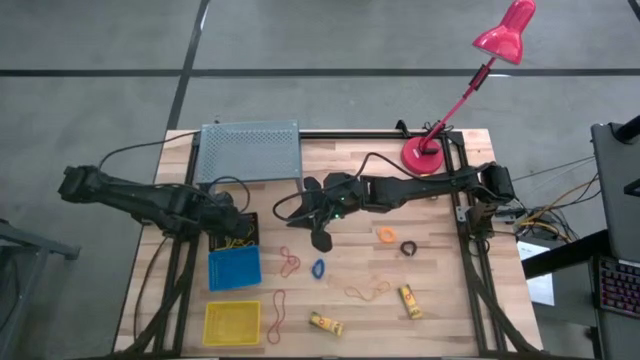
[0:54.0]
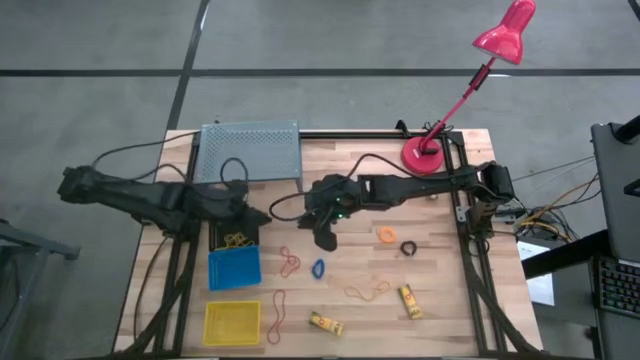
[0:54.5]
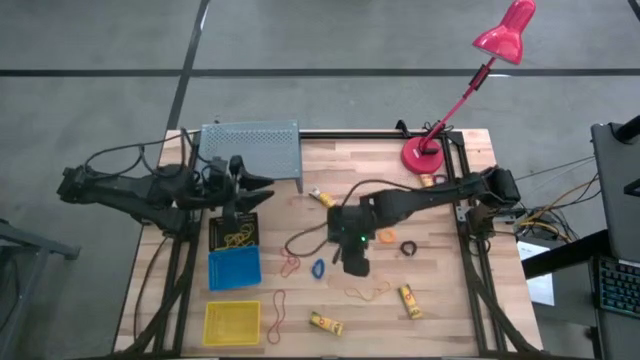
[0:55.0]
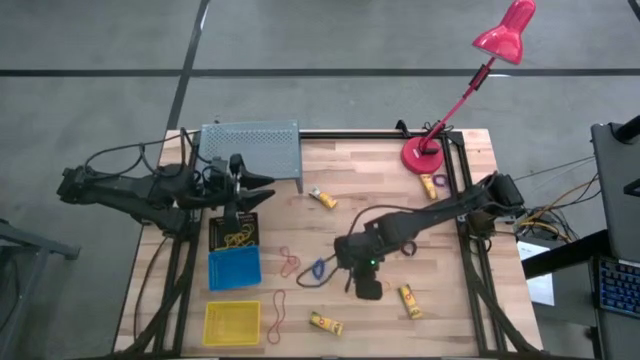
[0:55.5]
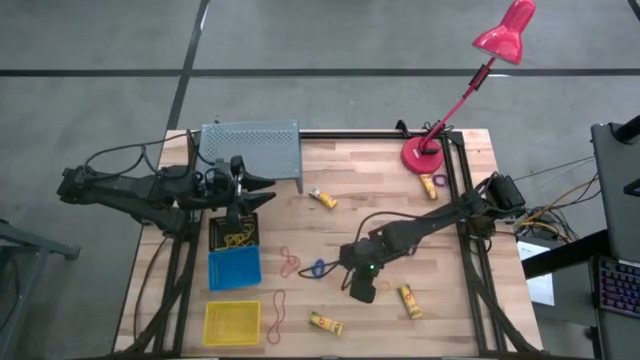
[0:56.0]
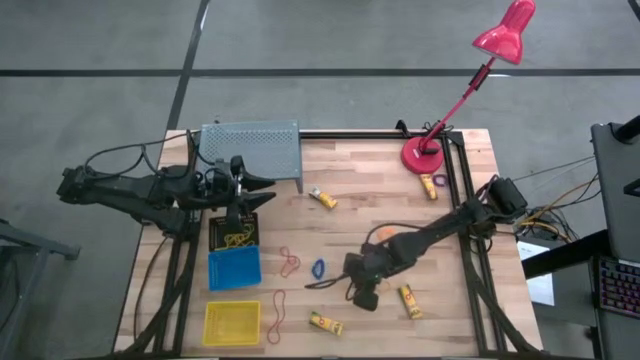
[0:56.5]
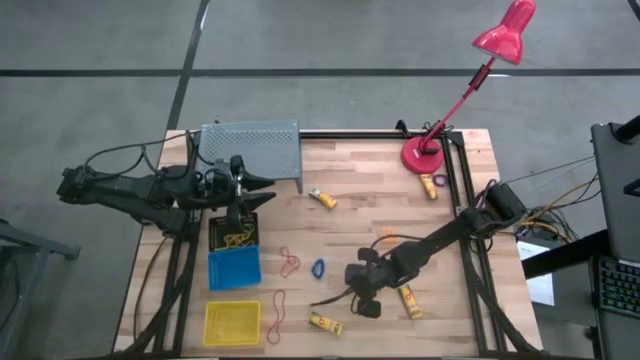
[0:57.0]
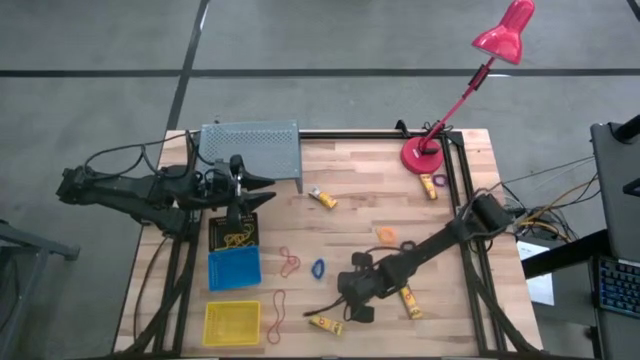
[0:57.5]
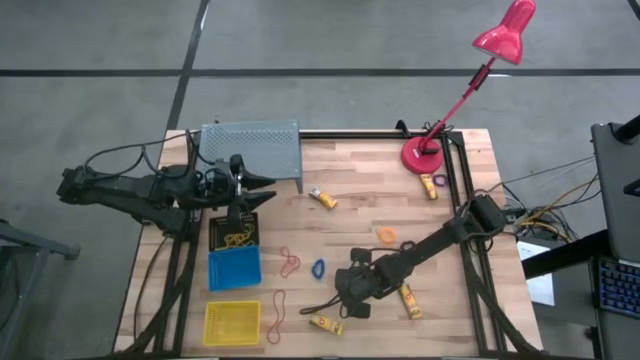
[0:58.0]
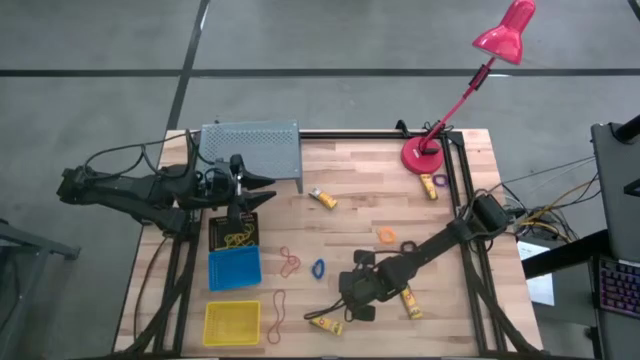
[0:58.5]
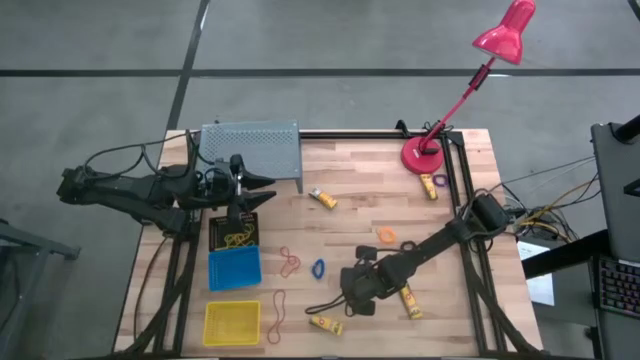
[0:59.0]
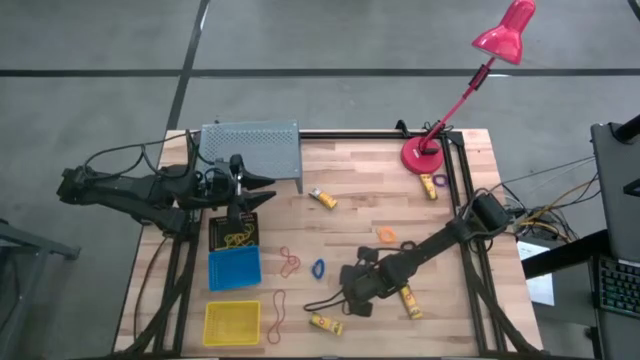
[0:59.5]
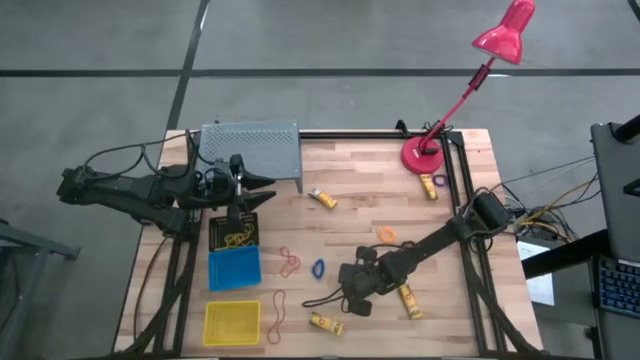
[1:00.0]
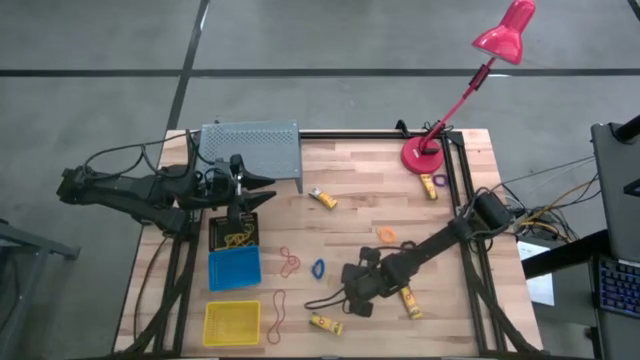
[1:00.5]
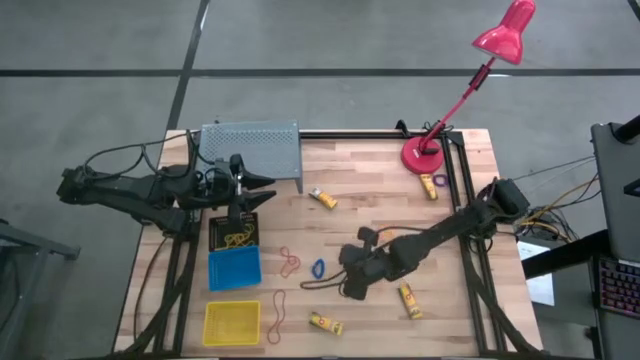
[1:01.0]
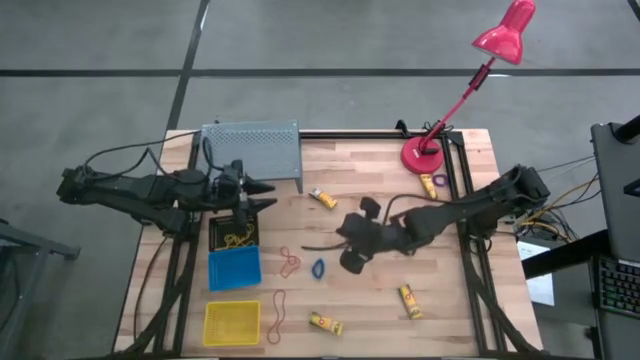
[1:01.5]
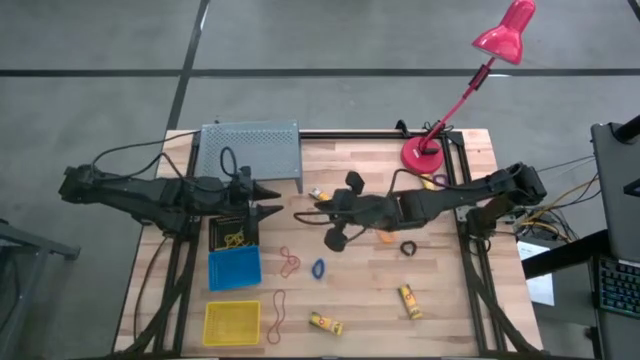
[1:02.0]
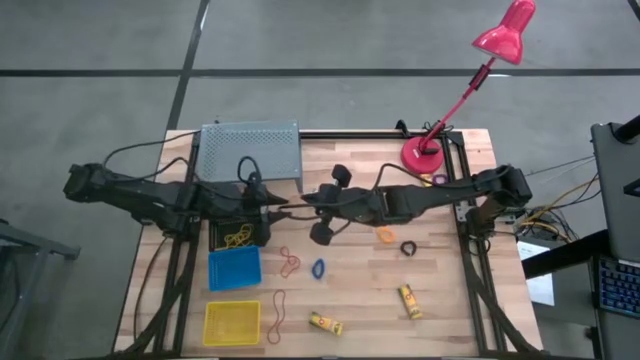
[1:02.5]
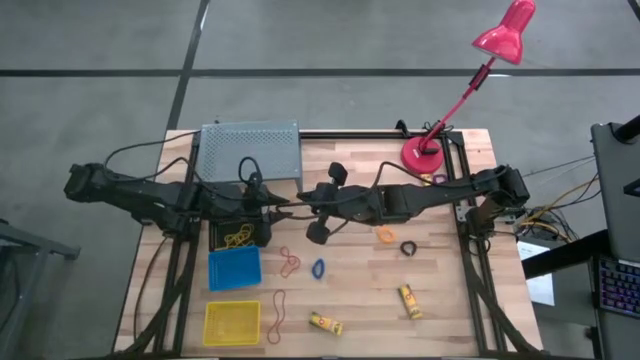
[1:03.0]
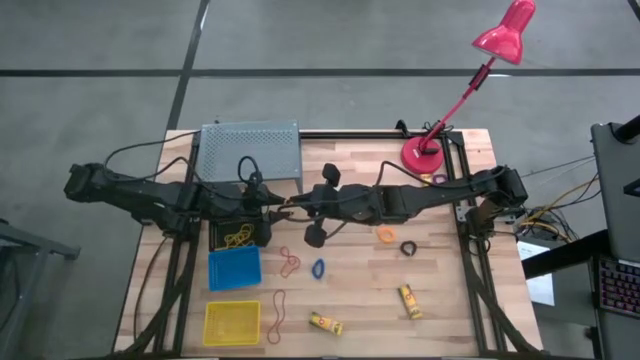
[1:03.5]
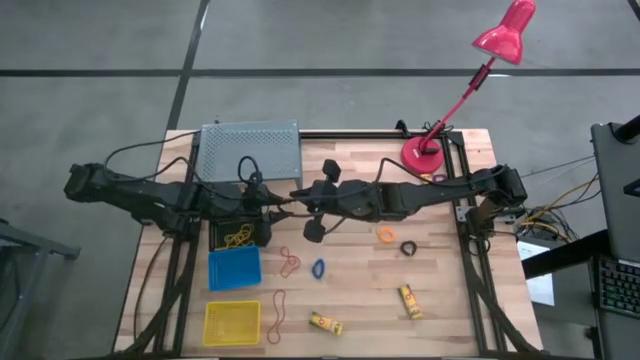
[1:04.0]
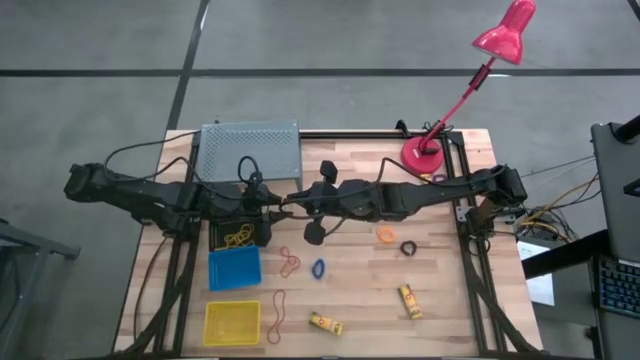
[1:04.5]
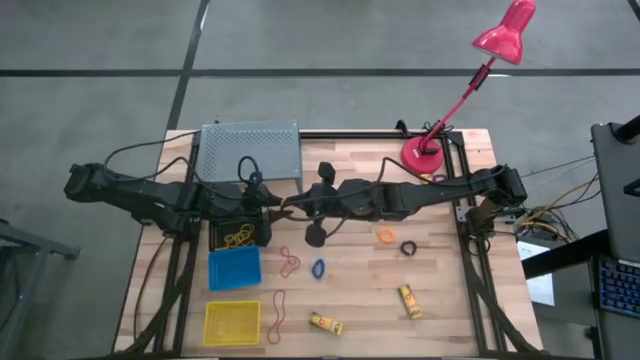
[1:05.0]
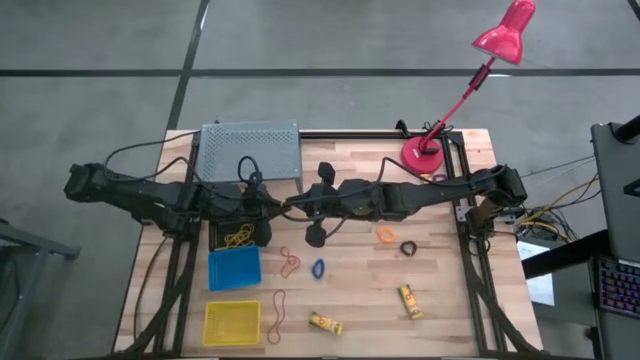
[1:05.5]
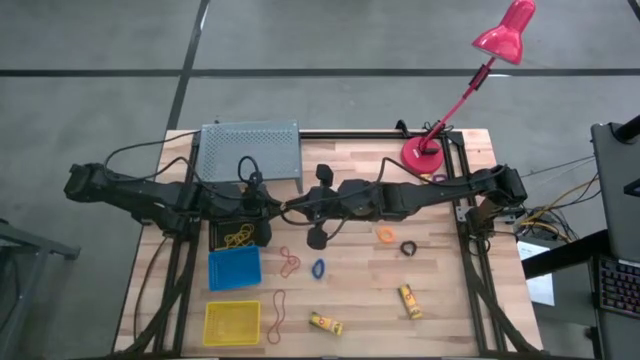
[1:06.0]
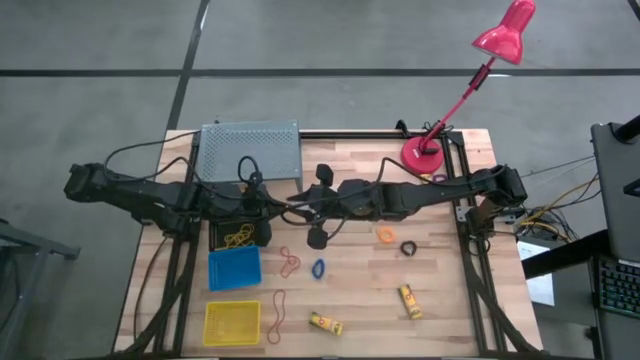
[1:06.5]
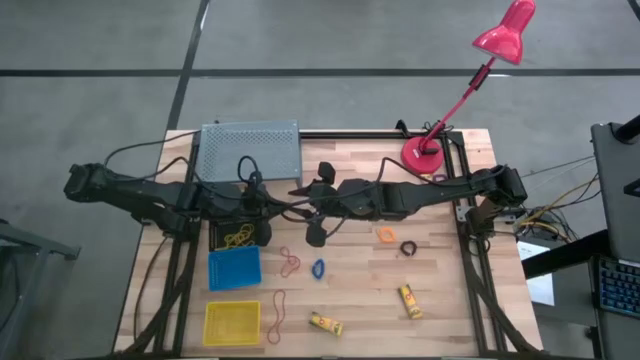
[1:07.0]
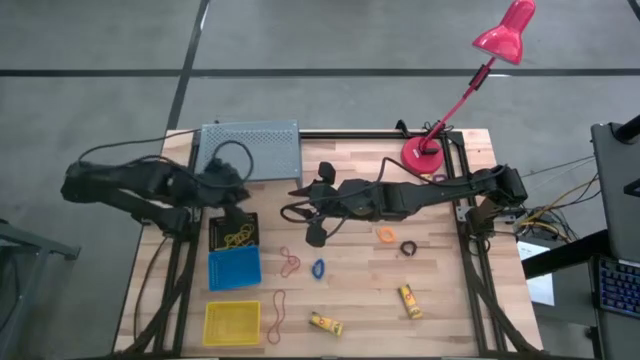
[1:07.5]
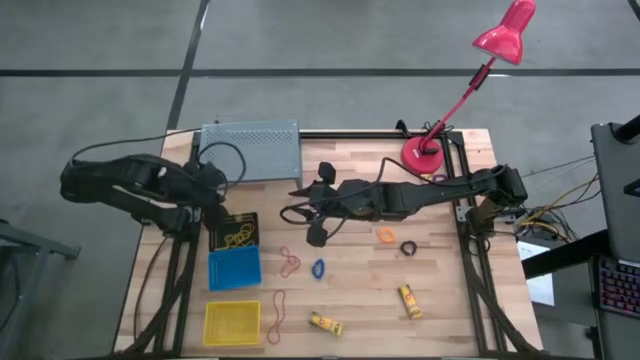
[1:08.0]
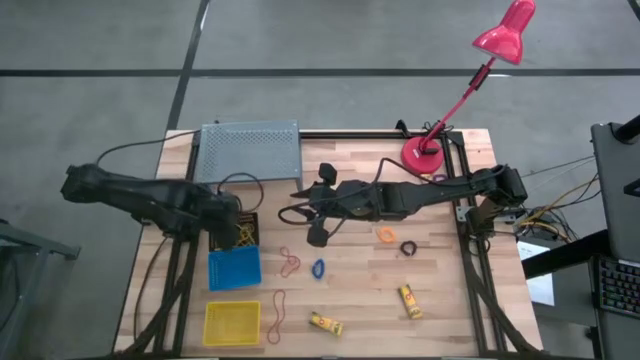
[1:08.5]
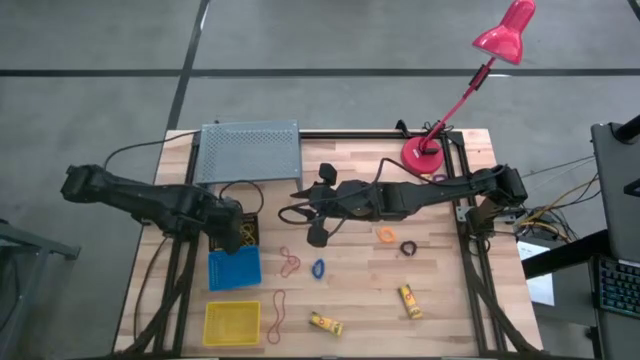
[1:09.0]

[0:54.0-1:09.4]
Task: Pick & Place Office Desk Supplies
Put the yellow rubber band in the black bin

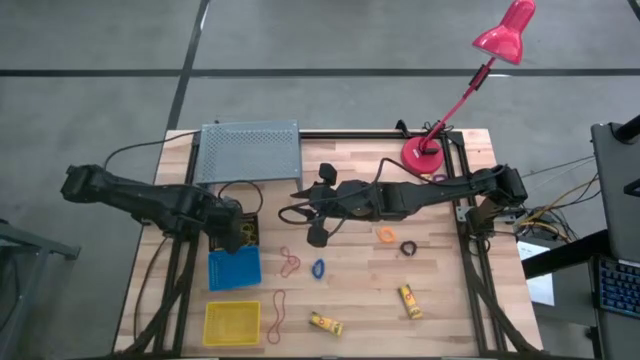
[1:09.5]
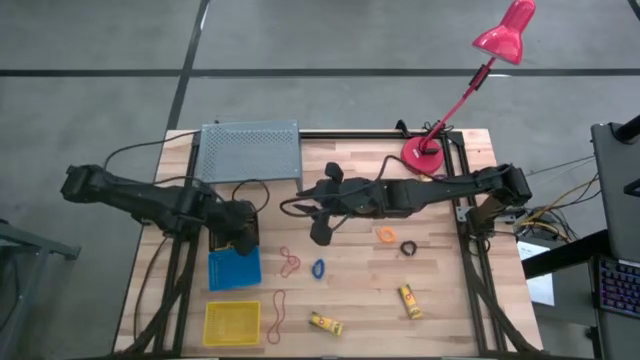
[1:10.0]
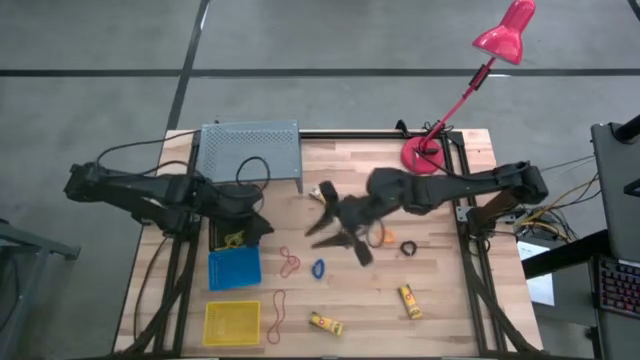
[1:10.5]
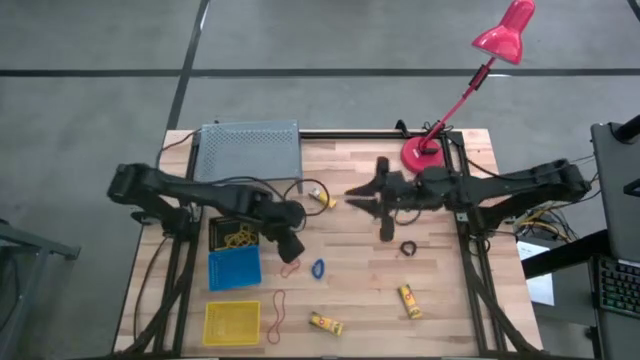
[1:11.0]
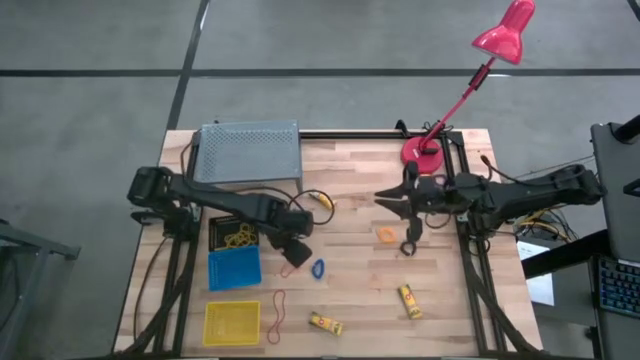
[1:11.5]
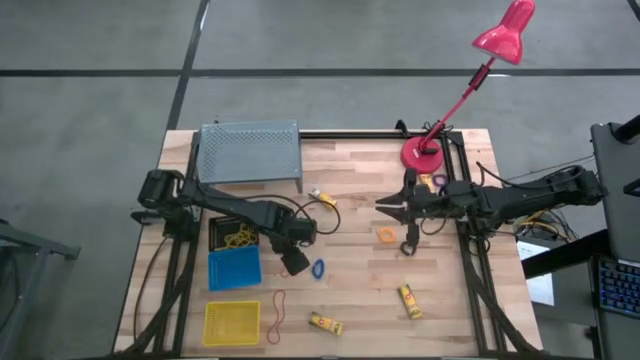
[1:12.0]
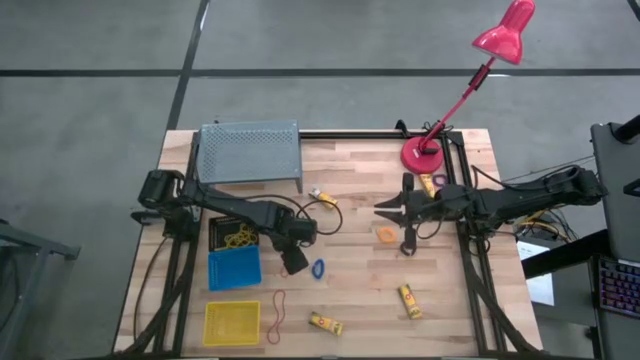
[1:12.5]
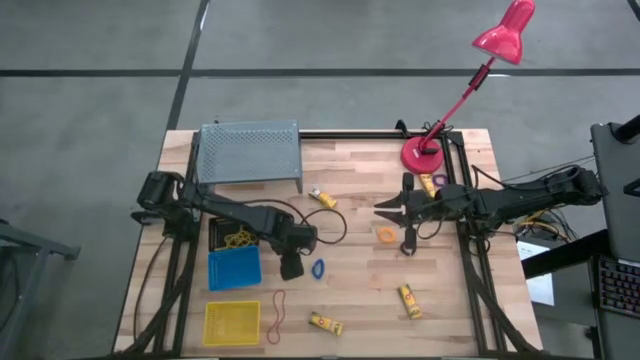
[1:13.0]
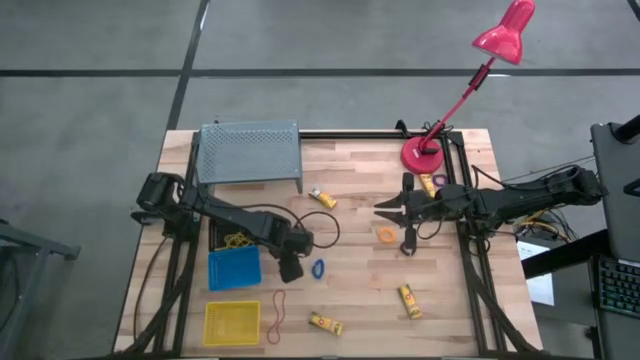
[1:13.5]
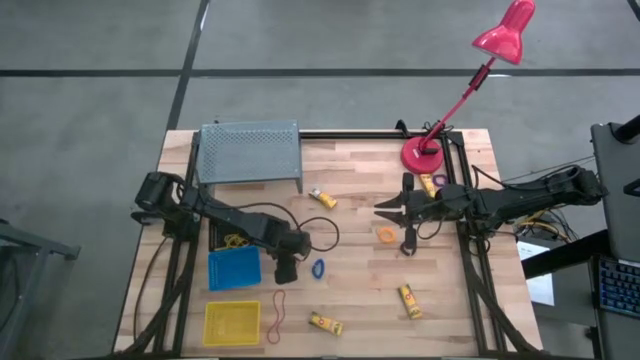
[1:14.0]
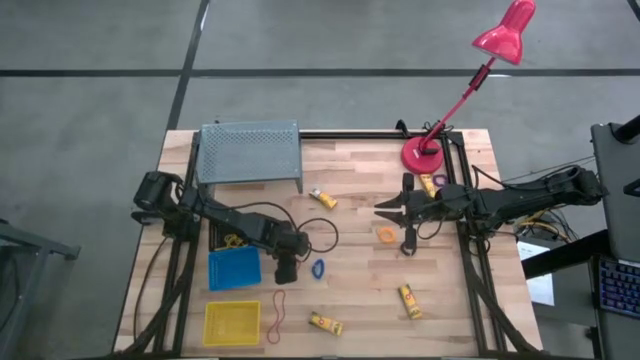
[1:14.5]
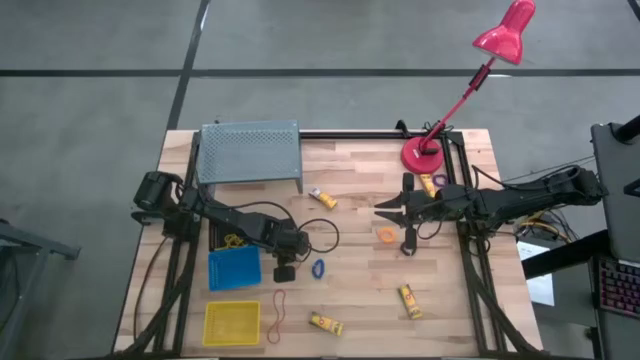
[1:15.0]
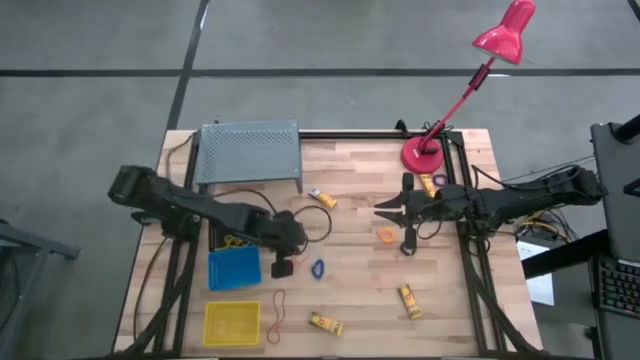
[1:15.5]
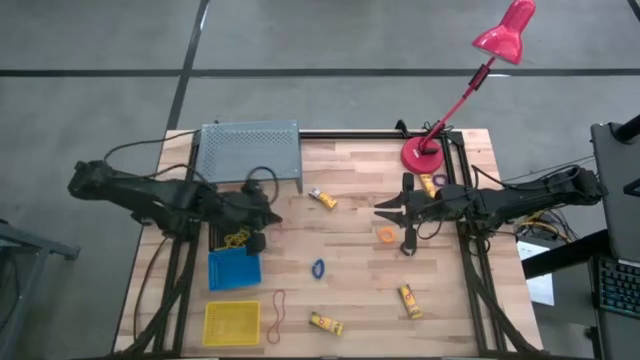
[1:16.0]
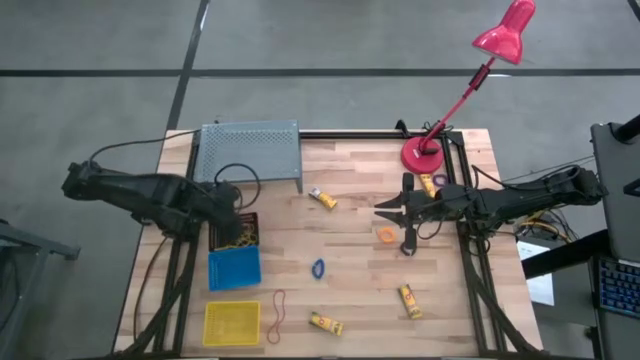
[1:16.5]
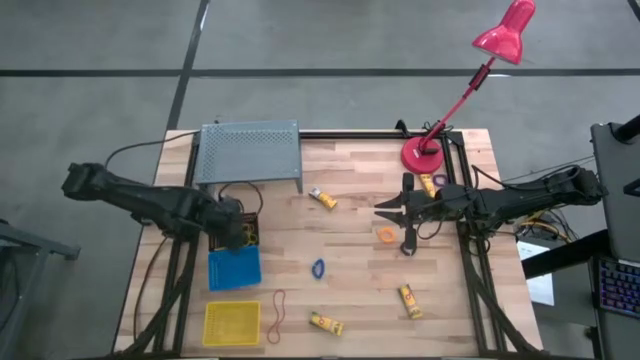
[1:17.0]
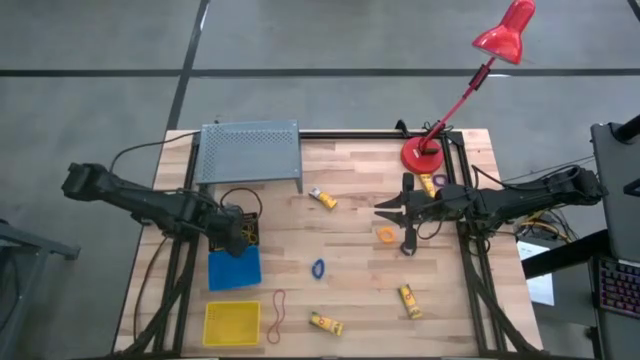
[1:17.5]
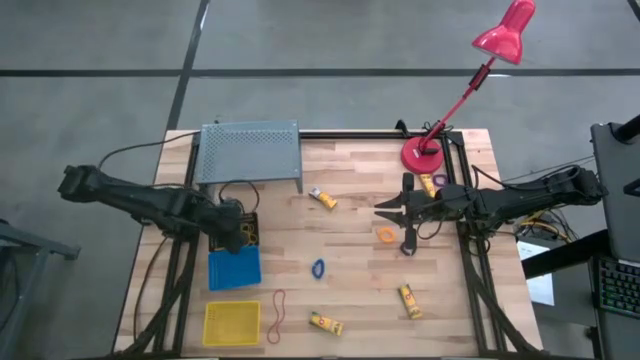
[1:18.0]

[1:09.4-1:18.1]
Put the red rubber band in the black bin
